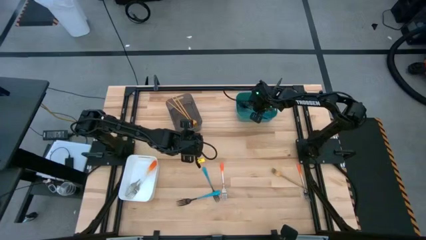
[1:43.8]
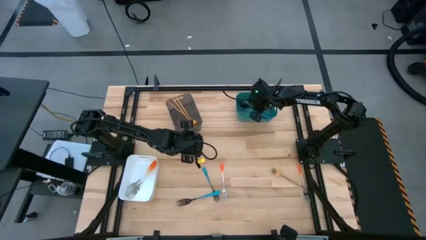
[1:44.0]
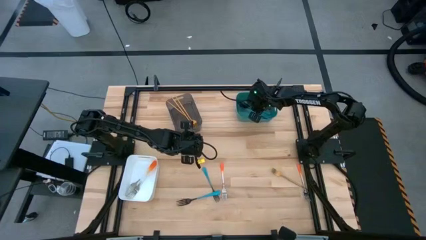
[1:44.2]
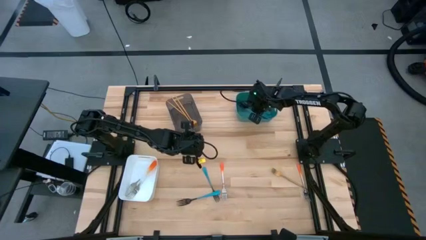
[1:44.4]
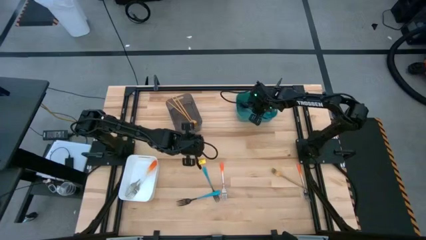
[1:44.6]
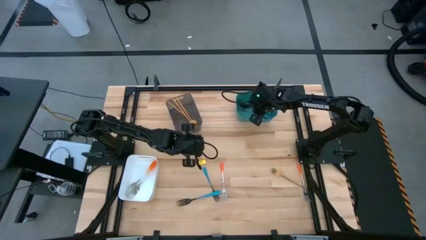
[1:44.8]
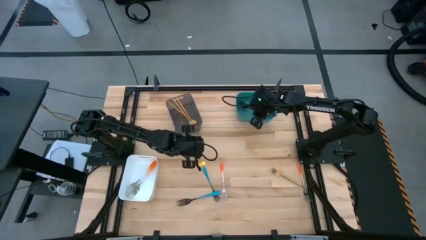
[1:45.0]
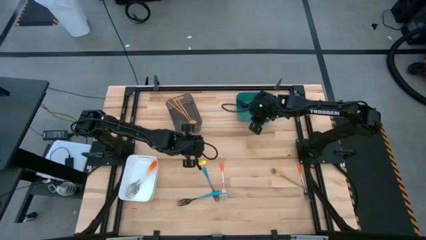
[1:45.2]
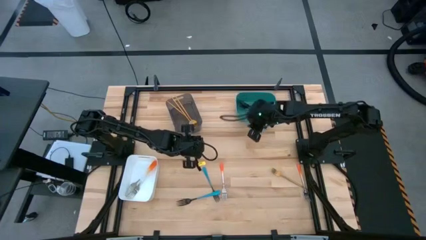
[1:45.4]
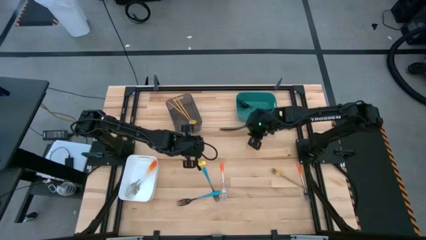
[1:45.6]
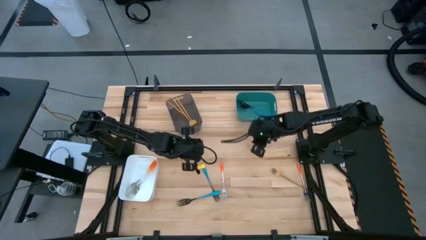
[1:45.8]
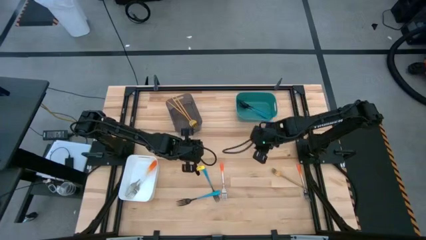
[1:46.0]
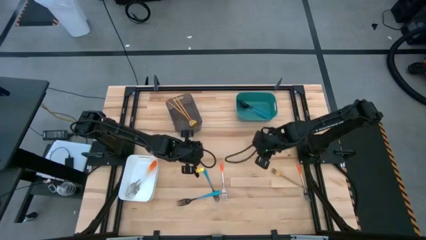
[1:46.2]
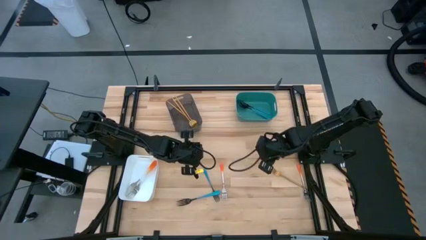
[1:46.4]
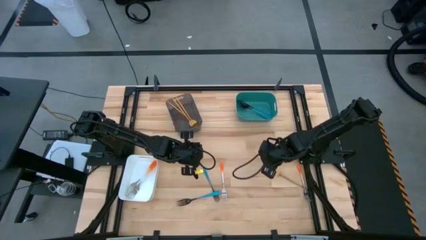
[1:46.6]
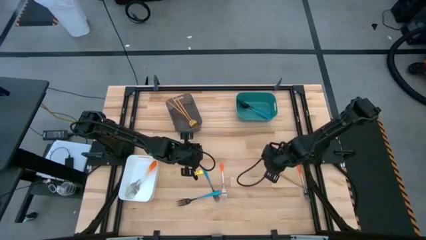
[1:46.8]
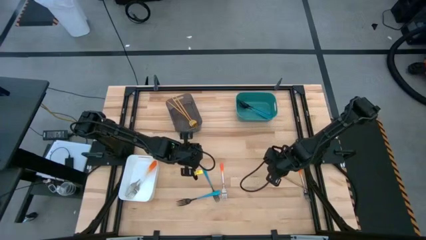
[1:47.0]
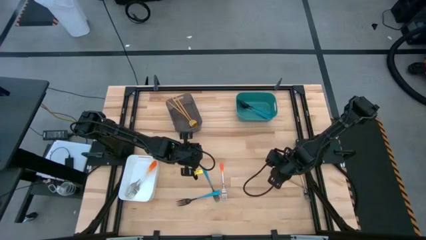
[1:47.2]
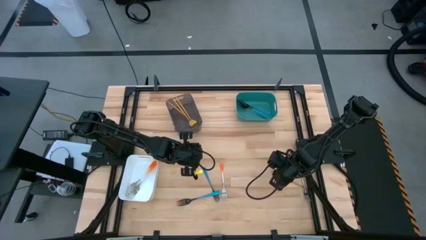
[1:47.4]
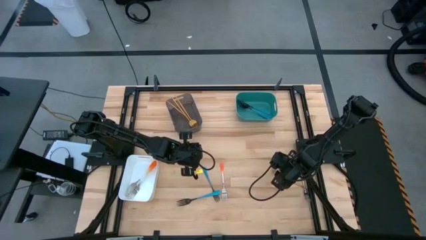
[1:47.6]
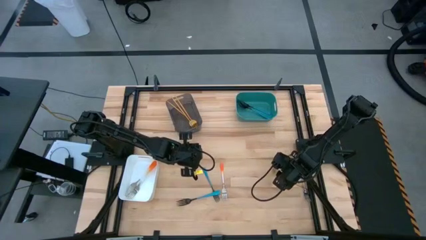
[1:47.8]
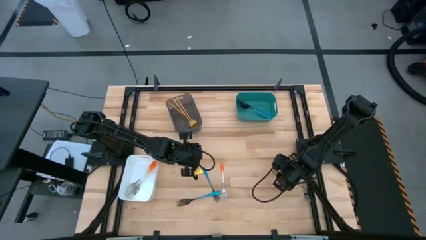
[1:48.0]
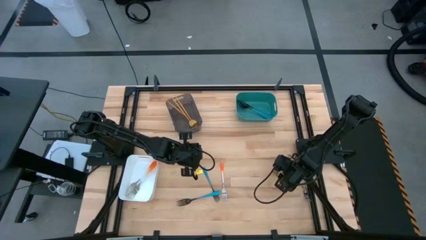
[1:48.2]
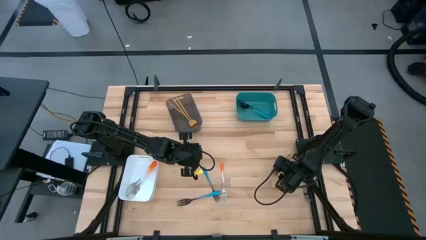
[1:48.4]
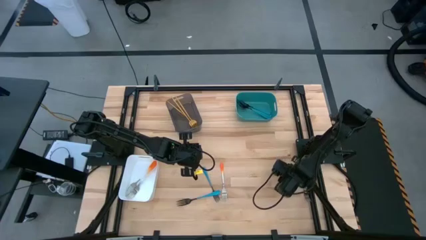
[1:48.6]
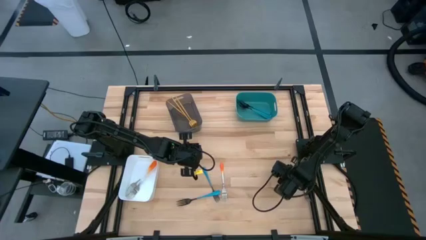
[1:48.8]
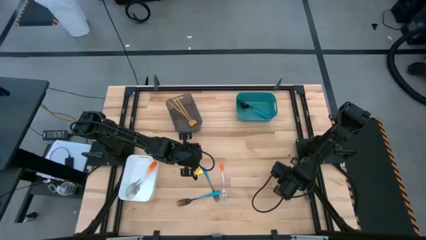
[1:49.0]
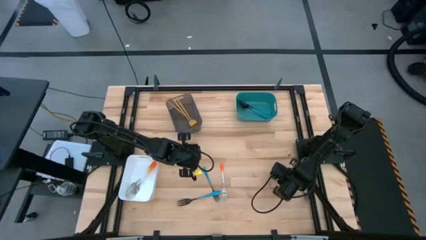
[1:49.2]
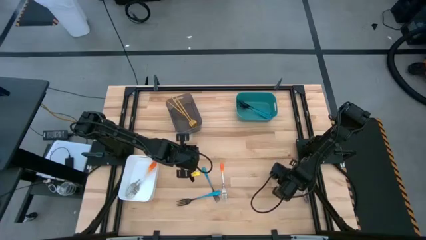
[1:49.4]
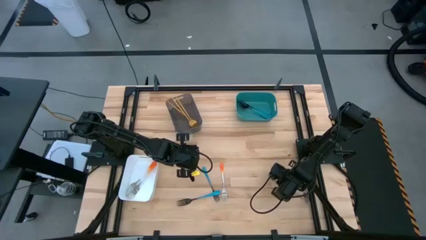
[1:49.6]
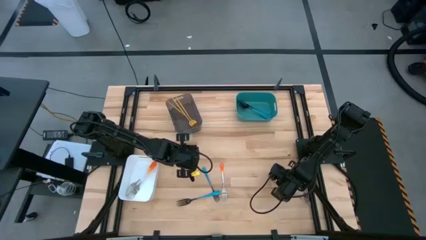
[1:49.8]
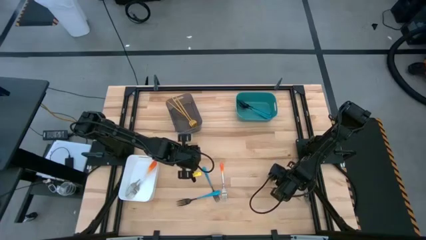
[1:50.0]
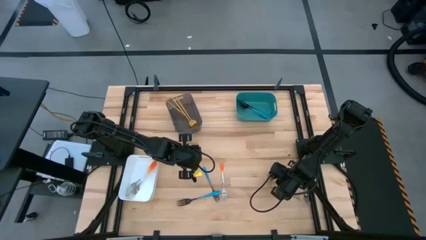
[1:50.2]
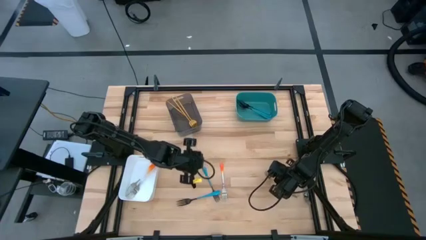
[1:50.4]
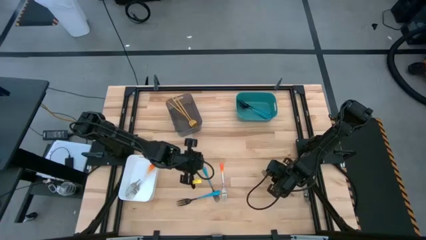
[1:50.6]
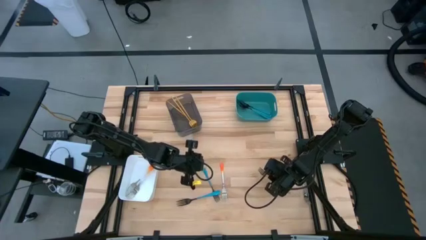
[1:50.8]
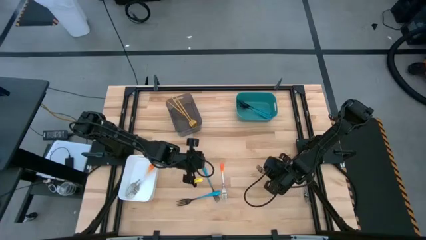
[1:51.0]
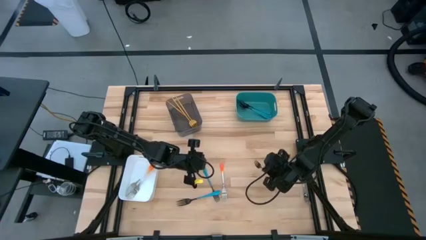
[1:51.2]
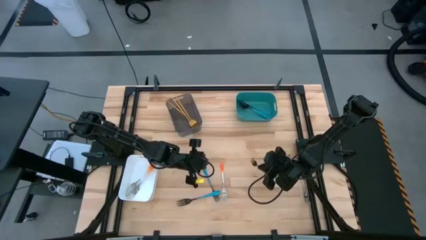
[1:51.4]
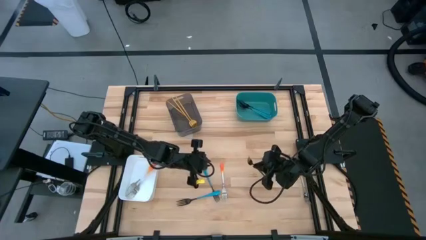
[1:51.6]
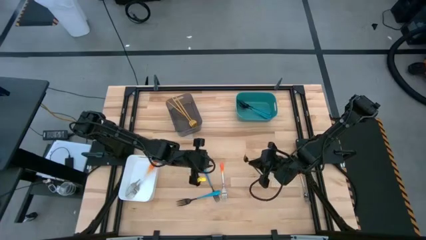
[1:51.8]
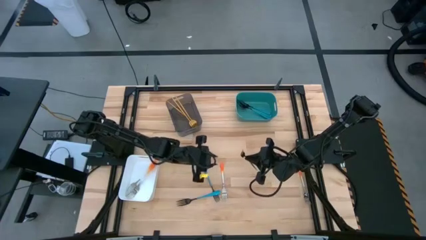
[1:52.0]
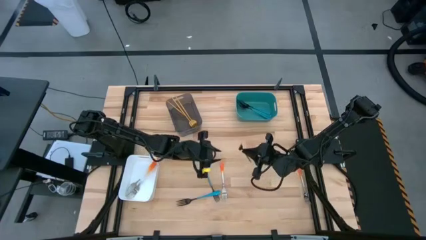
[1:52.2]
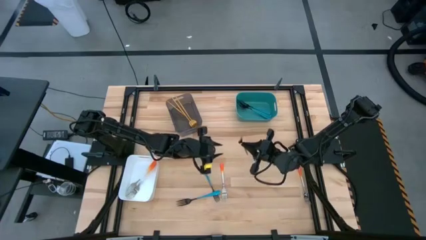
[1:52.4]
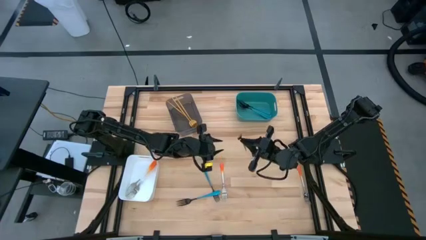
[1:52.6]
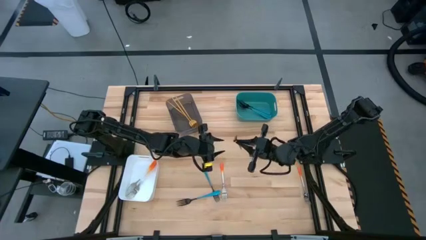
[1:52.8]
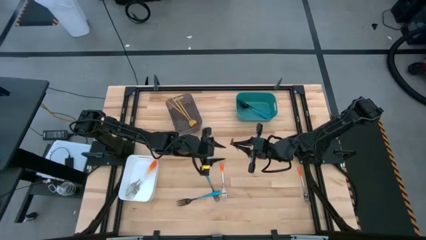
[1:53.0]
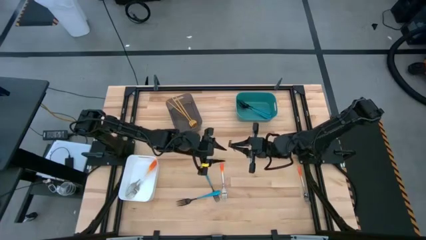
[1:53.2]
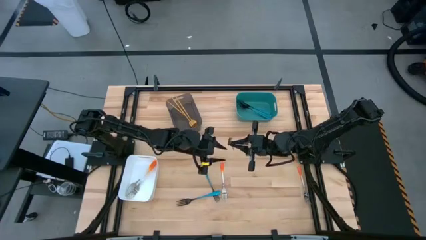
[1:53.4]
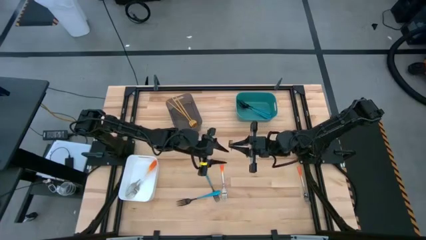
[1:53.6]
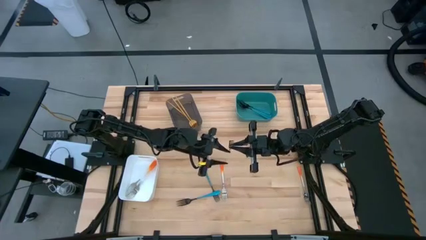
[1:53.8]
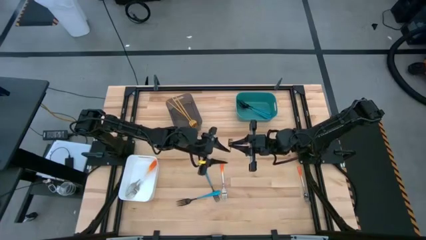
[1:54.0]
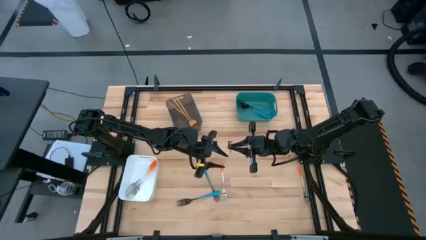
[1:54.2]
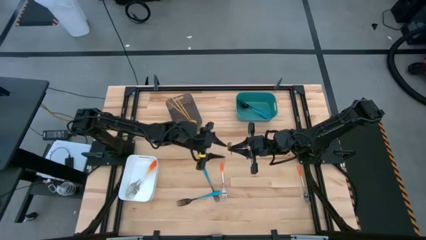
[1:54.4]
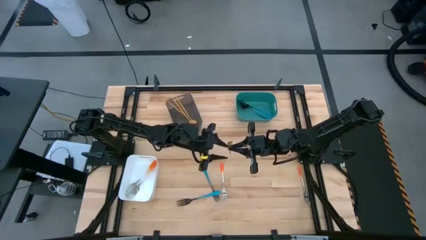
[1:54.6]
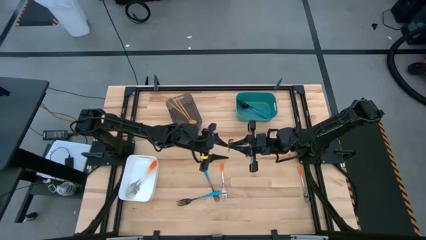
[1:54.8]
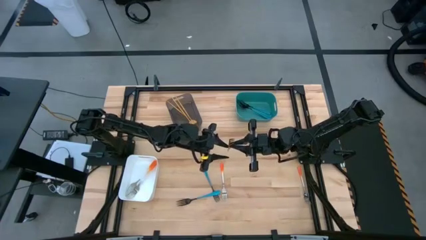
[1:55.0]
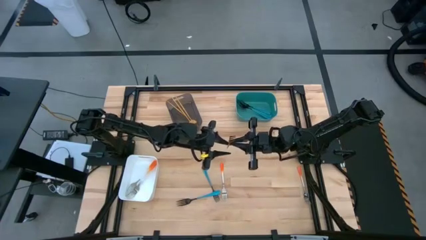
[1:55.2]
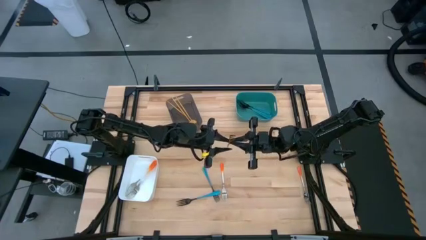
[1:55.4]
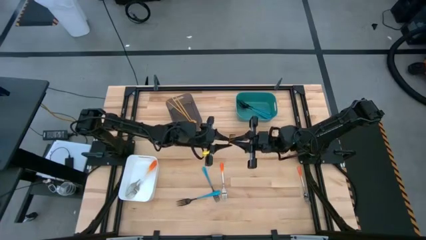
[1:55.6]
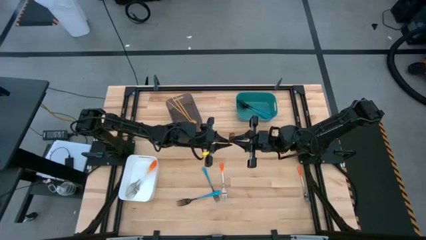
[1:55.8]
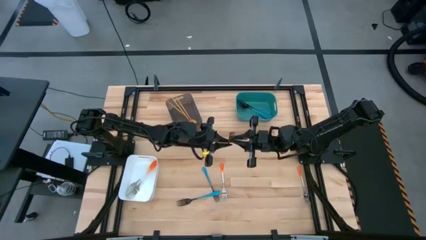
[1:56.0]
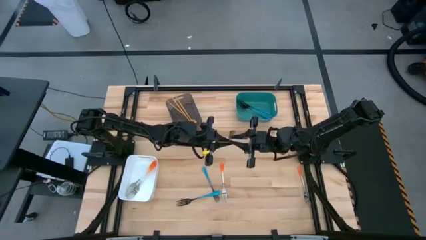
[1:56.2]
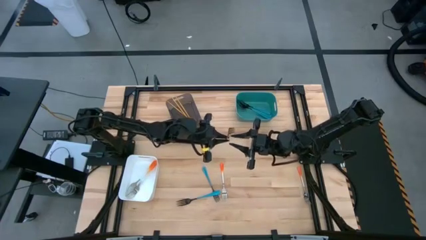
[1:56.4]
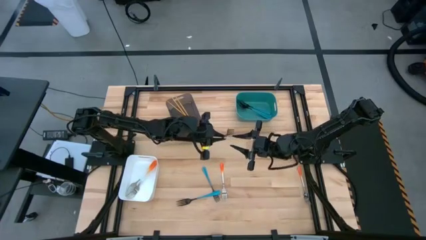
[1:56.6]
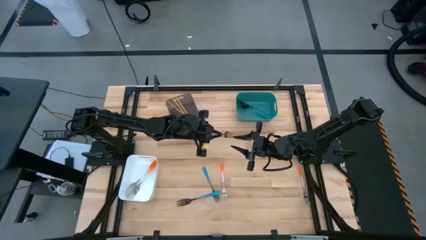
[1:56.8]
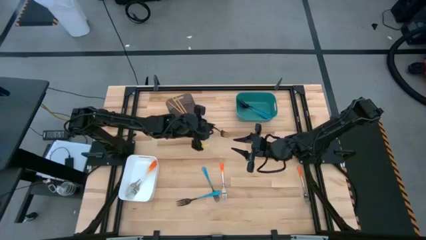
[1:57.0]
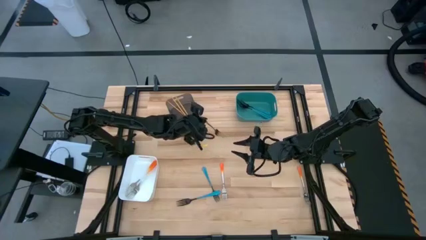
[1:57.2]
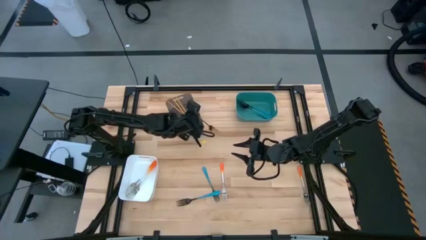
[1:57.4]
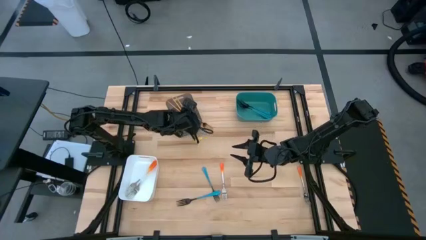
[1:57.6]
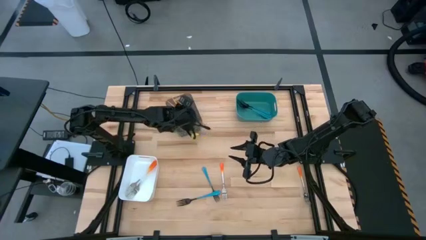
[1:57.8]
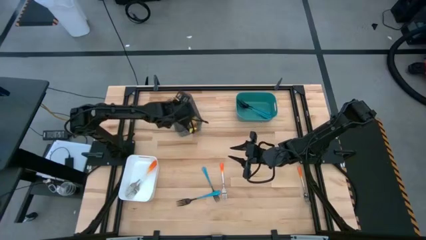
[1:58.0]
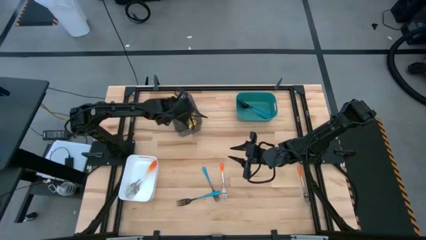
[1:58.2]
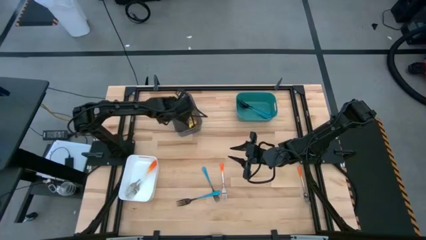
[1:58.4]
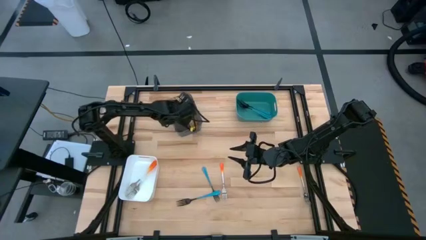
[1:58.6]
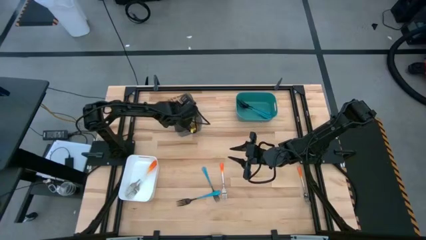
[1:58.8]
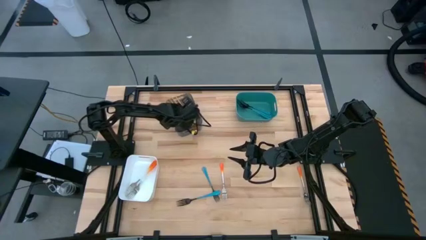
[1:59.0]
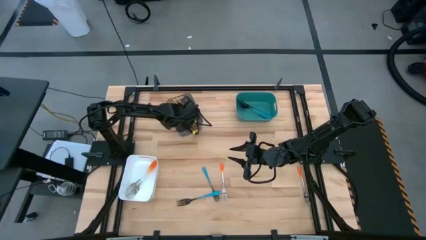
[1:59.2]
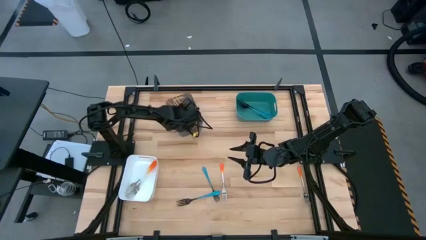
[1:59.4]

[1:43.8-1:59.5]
Task: Sort silverware by color (type)
Put the gold fork into the black bin
